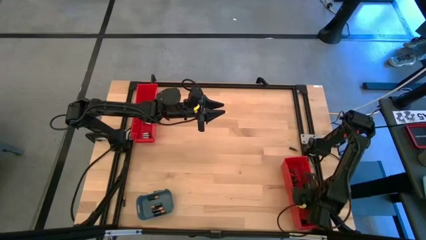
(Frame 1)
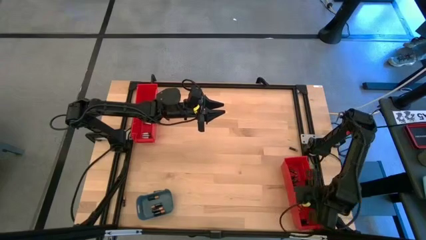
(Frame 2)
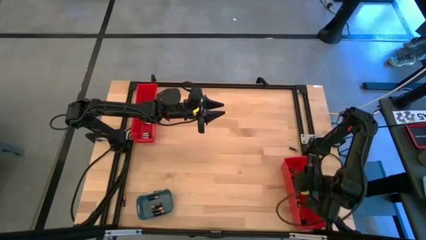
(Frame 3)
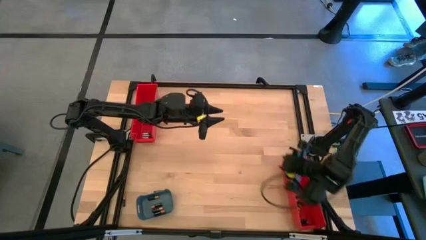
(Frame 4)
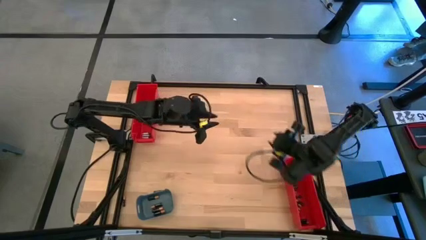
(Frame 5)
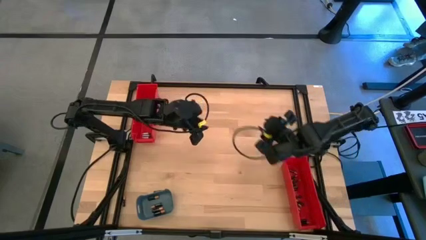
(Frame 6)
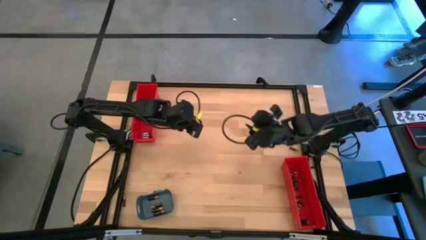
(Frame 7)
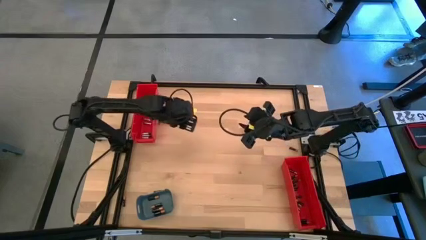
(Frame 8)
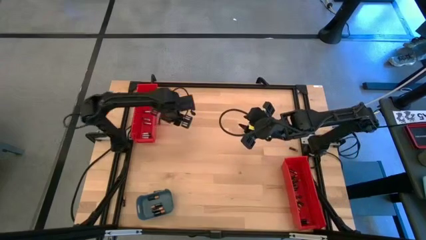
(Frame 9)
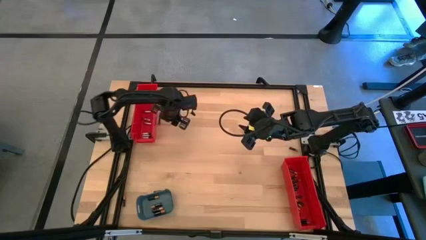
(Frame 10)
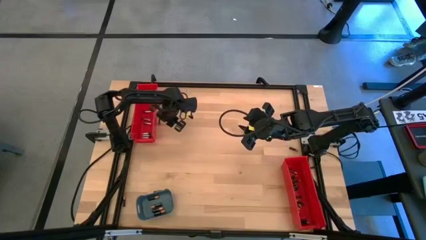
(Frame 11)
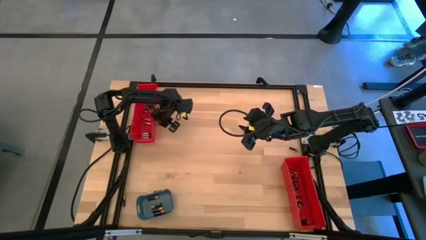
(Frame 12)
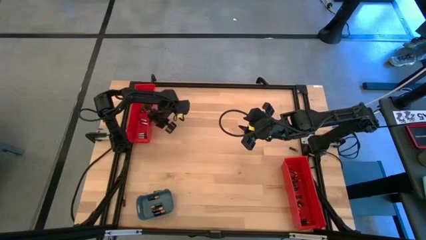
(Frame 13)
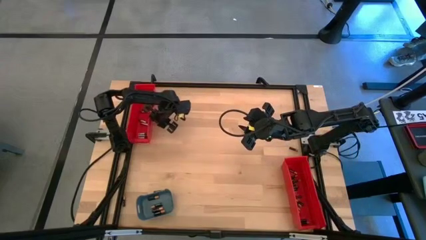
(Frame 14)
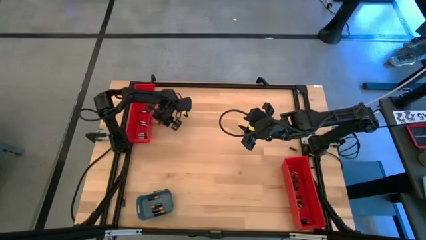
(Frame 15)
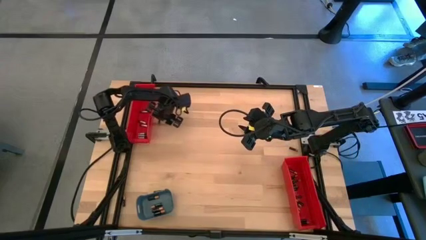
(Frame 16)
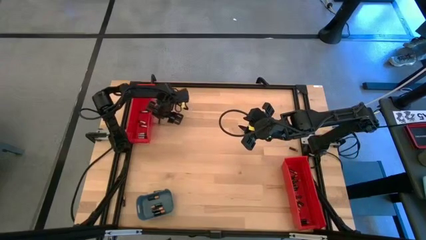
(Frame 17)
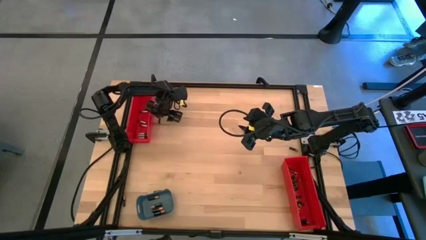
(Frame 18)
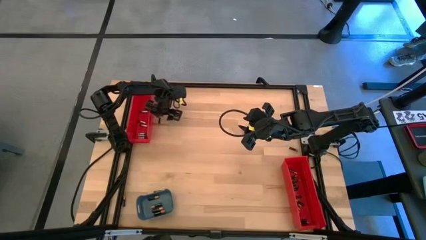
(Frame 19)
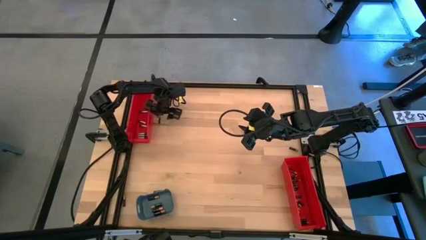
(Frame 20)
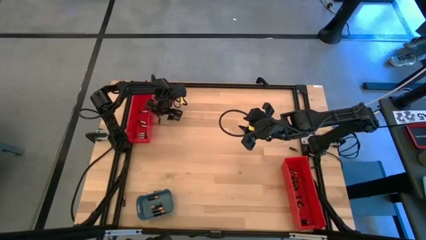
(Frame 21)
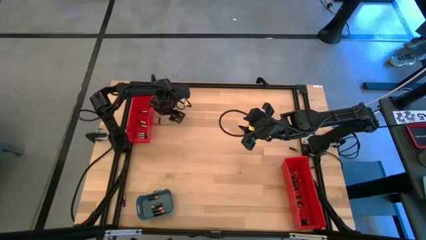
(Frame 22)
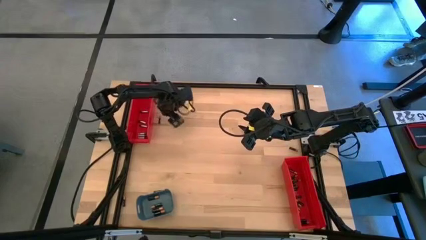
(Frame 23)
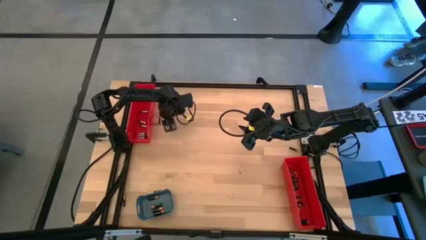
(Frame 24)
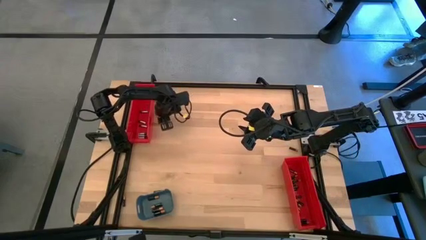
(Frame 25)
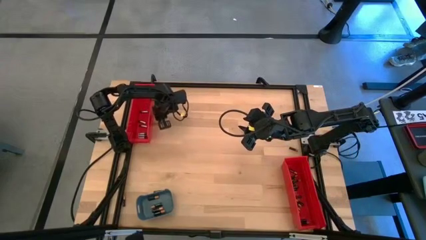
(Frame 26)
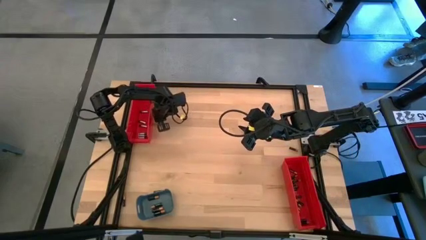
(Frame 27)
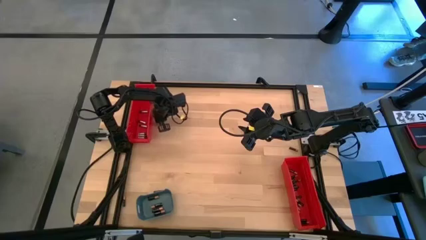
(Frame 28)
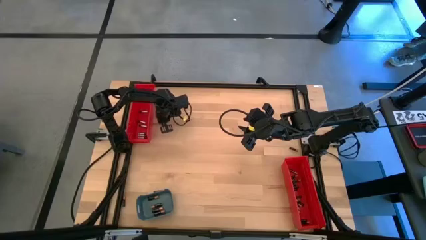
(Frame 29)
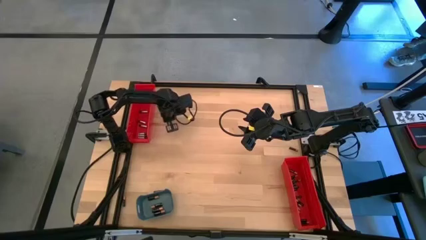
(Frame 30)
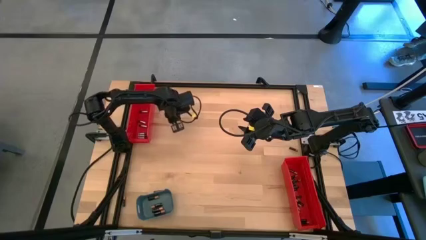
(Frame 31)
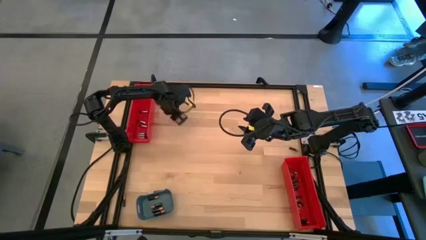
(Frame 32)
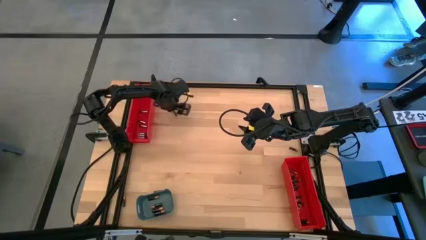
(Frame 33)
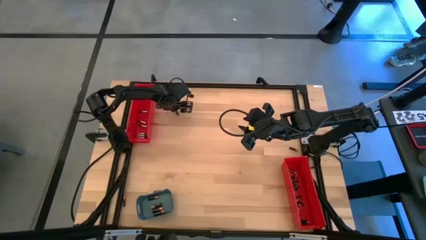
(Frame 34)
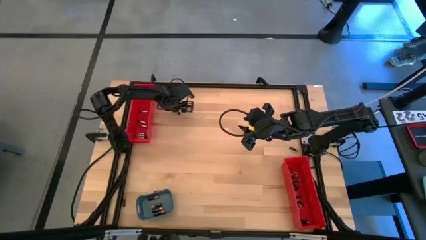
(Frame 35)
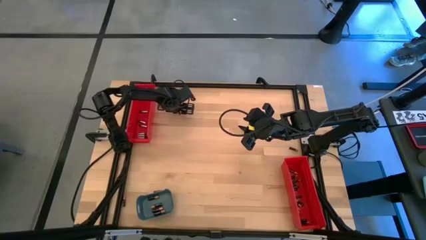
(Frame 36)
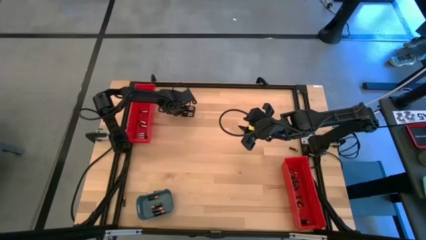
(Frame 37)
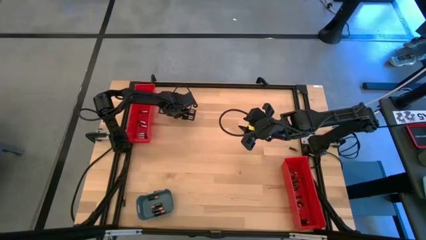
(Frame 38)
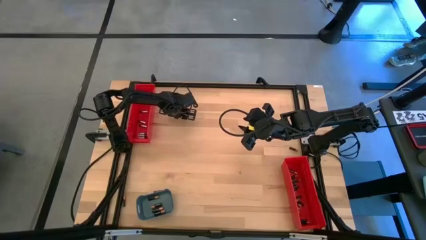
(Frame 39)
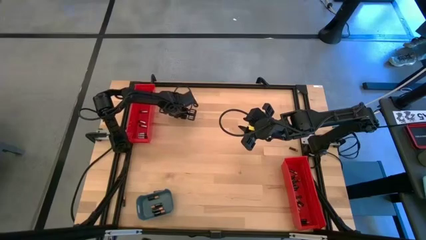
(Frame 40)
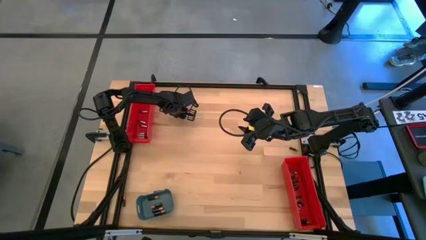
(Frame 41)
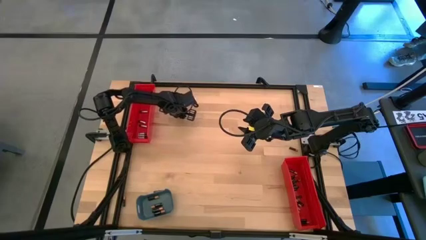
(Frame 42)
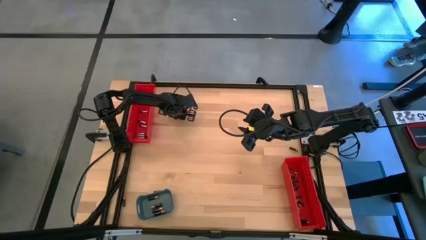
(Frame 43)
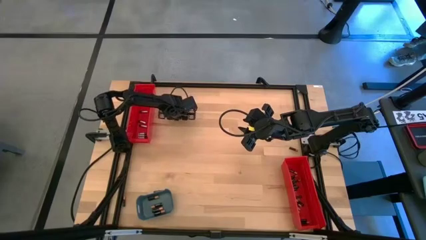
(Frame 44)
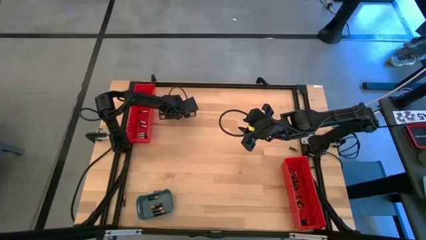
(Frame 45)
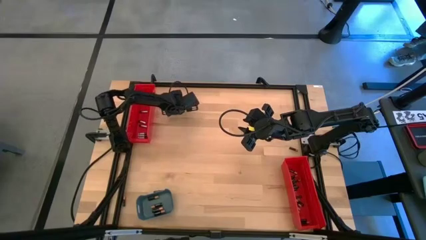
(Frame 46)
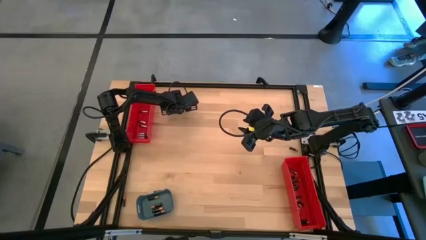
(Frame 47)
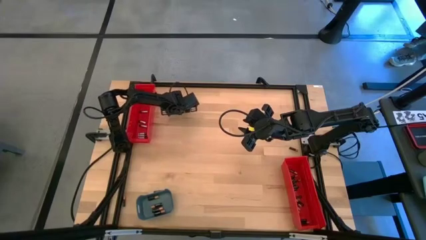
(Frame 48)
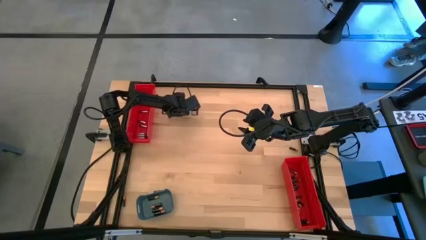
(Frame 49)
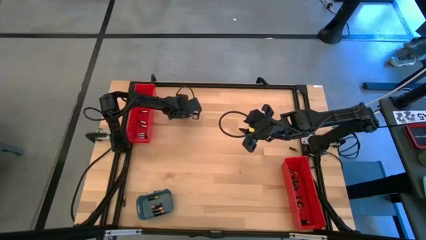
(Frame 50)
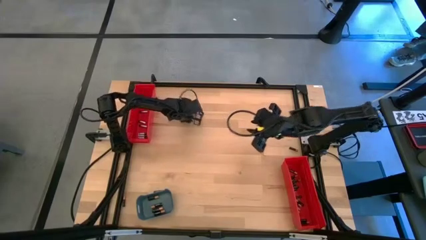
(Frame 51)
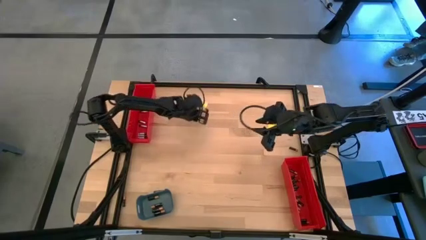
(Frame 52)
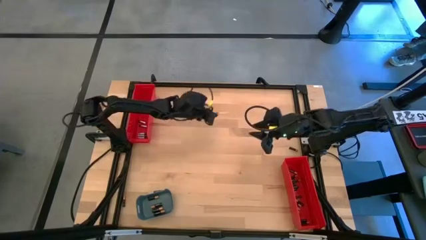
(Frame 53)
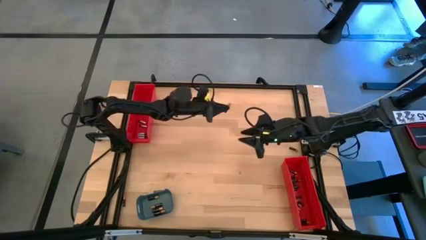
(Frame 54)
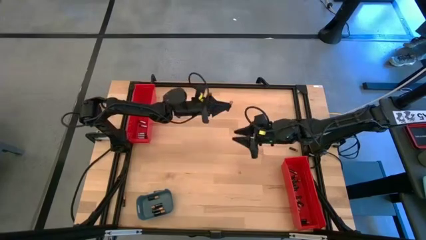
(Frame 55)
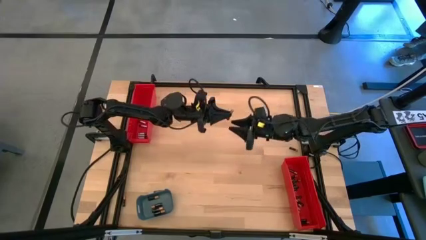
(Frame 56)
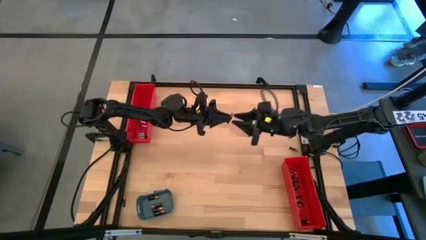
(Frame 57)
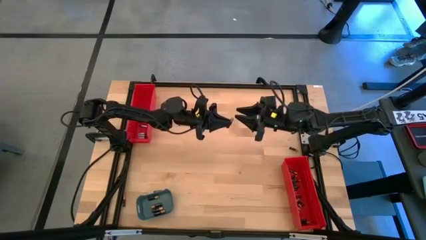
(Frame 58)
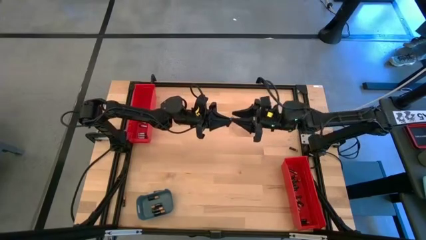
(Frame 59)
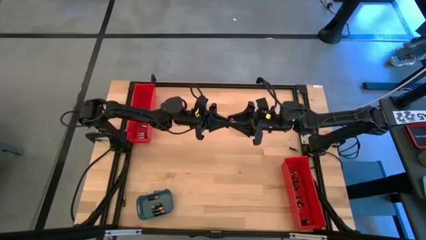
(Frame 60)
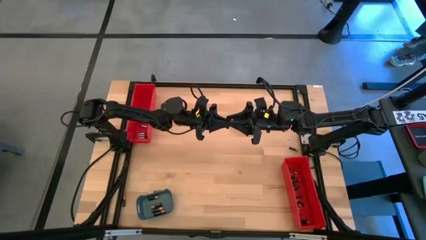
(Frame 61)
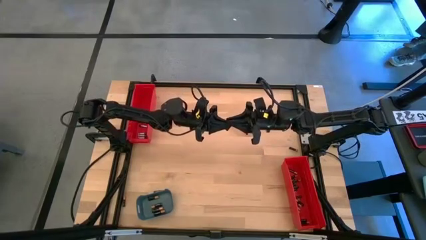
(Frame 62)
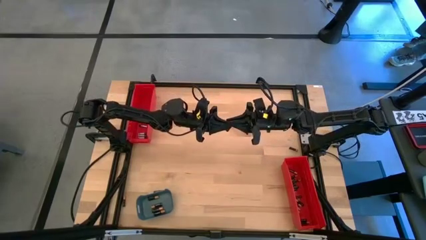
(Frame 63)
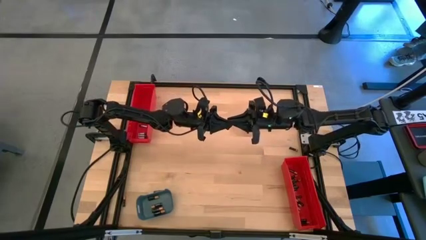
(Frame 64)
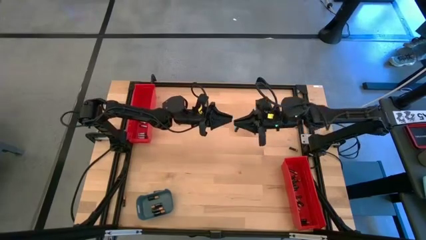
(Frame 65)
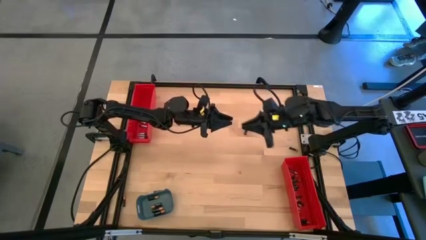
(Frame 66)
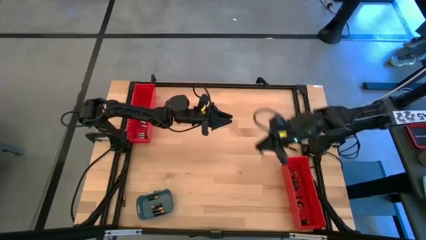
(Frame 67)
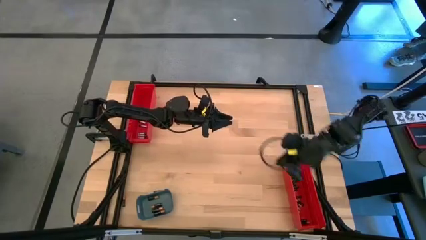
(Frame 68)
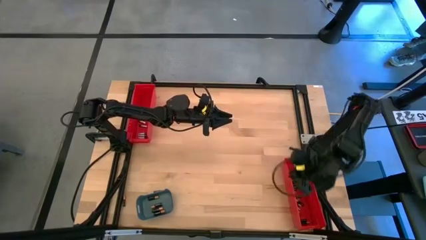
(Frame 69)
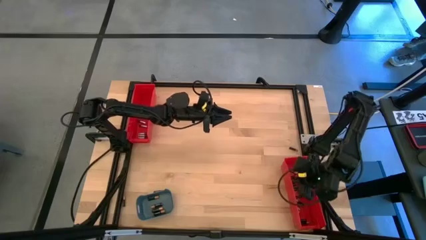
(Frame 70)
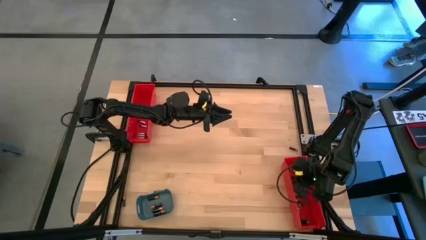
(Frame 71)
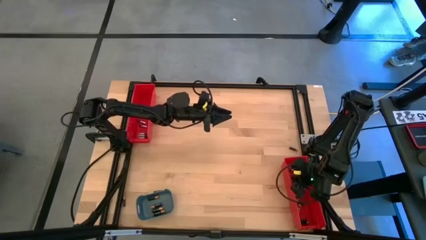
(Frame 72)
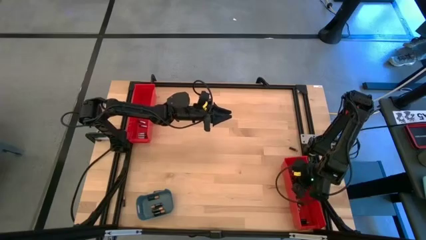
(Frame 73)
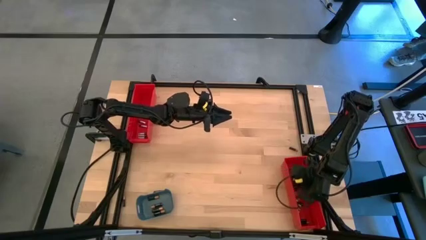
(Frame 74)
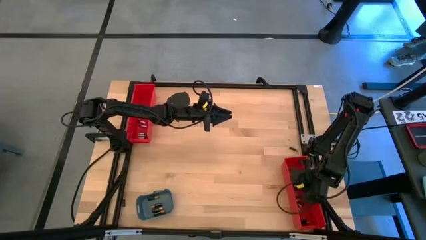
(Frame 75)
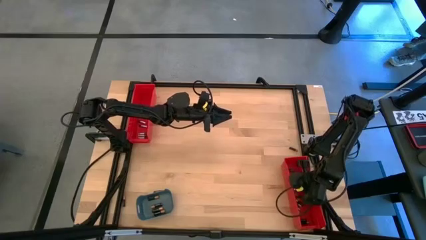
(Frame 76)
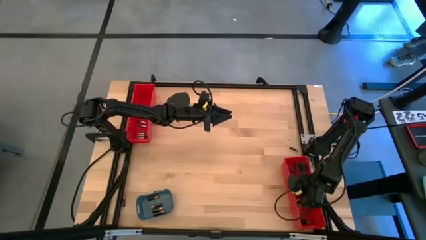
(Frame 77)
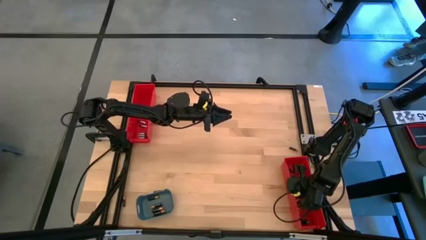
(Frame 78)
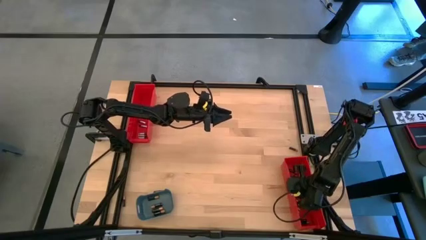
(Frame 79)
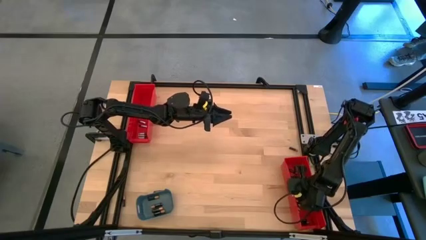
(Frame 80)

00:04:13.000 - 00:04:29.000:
Task: Sort batteries
Put the small black battery into the bottom red bin
